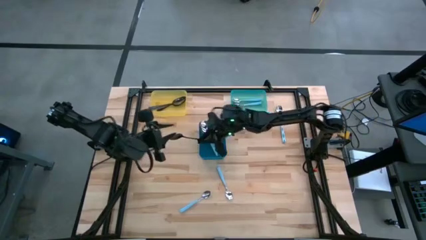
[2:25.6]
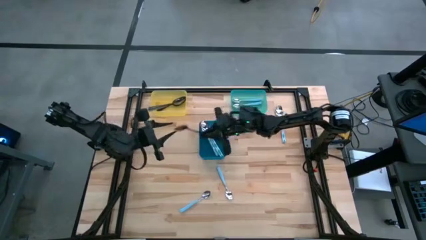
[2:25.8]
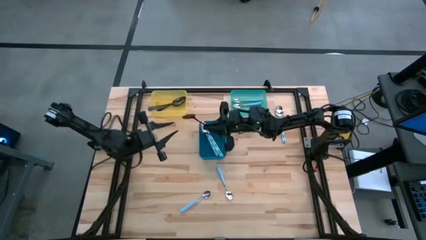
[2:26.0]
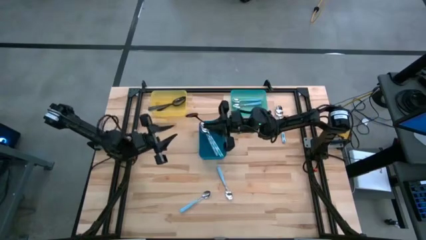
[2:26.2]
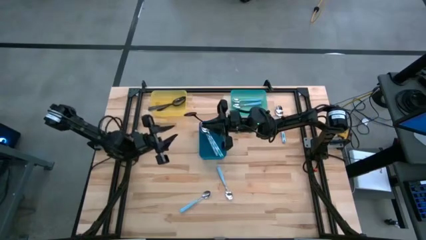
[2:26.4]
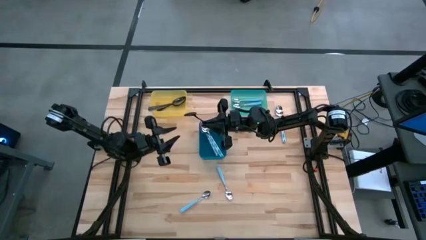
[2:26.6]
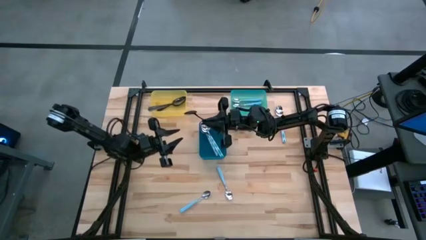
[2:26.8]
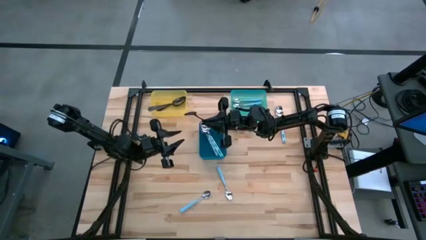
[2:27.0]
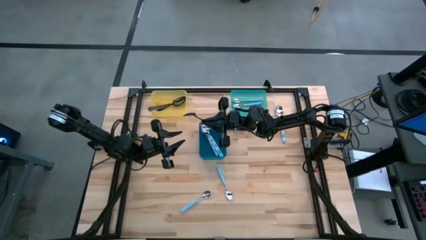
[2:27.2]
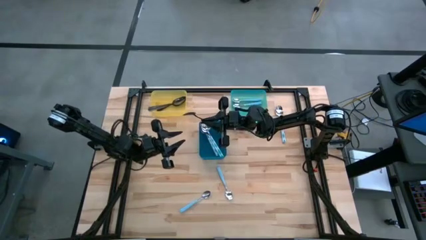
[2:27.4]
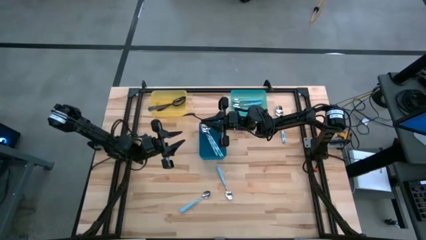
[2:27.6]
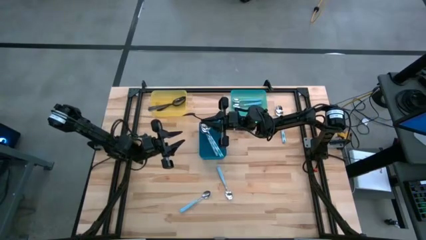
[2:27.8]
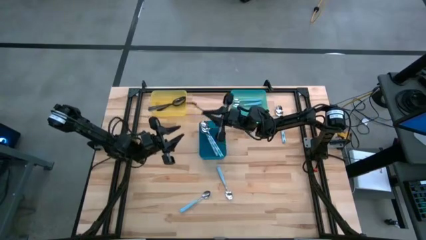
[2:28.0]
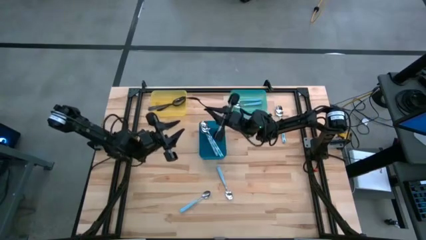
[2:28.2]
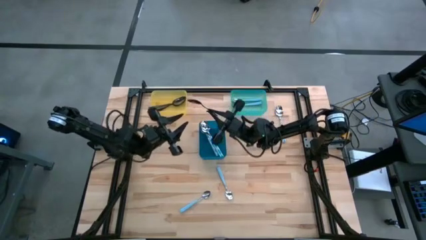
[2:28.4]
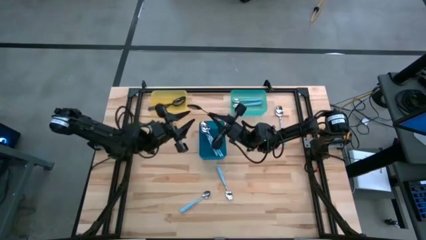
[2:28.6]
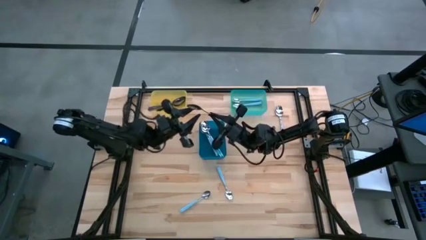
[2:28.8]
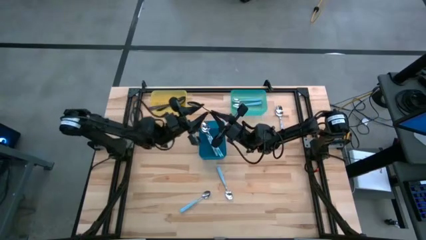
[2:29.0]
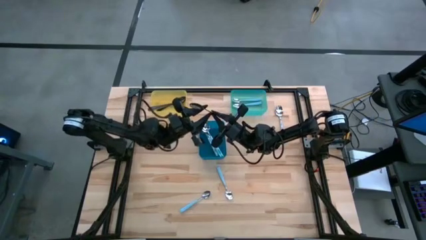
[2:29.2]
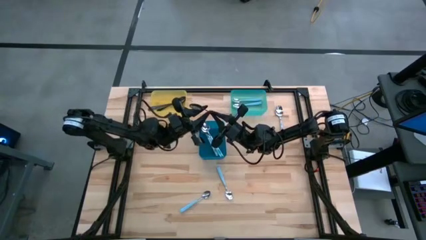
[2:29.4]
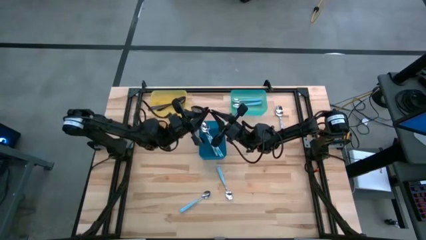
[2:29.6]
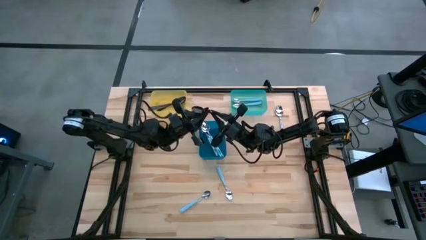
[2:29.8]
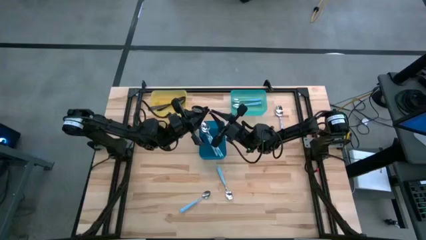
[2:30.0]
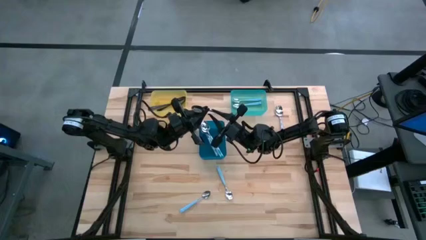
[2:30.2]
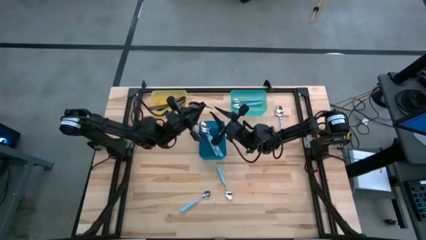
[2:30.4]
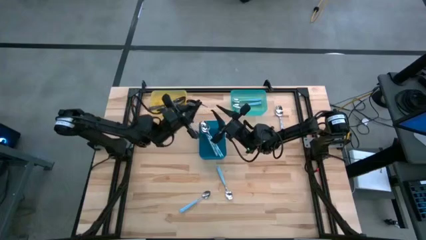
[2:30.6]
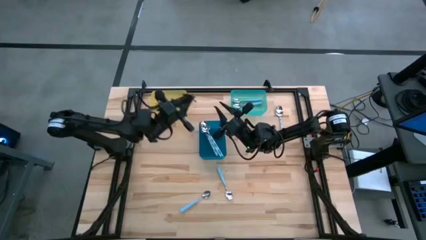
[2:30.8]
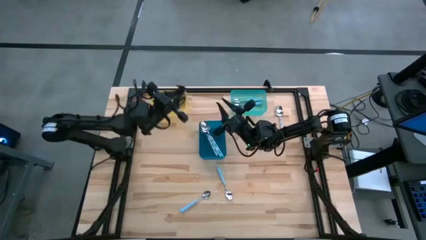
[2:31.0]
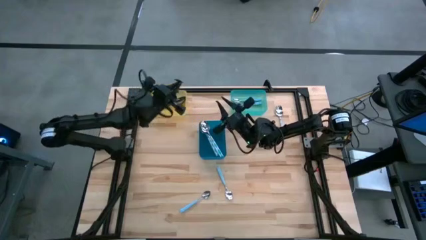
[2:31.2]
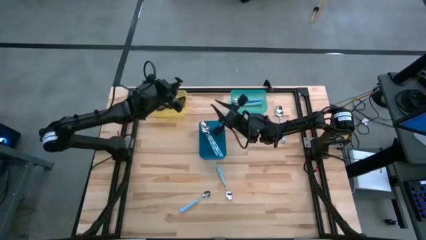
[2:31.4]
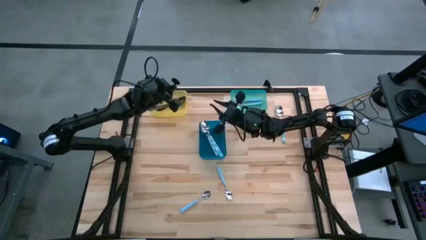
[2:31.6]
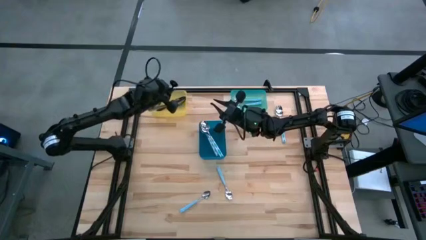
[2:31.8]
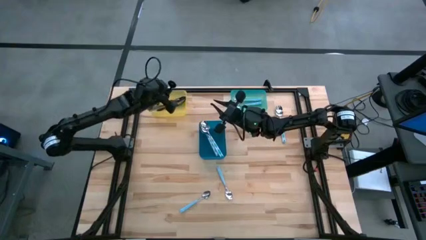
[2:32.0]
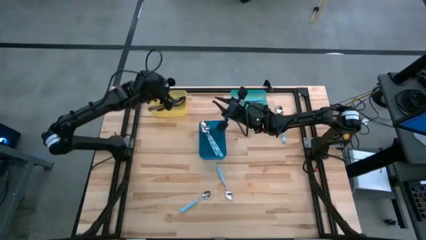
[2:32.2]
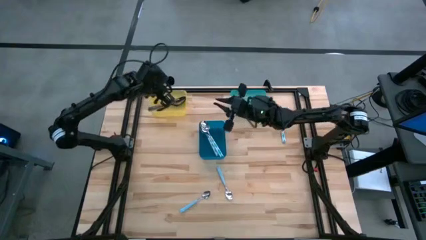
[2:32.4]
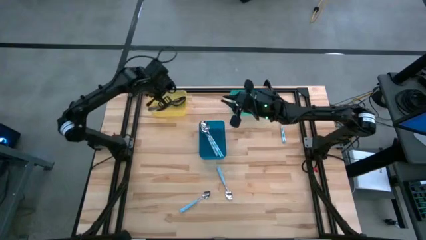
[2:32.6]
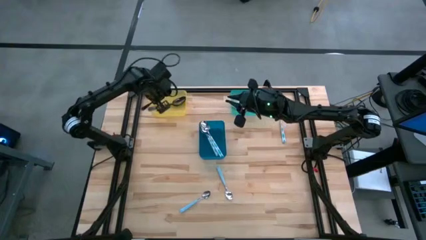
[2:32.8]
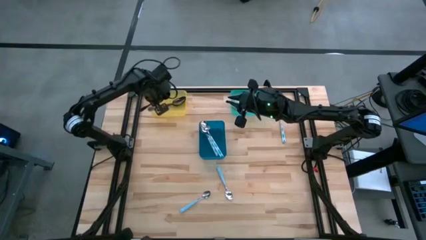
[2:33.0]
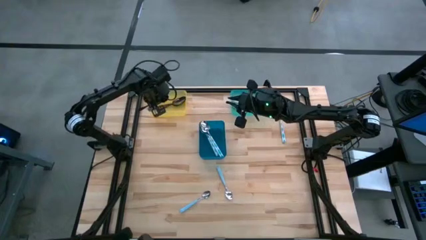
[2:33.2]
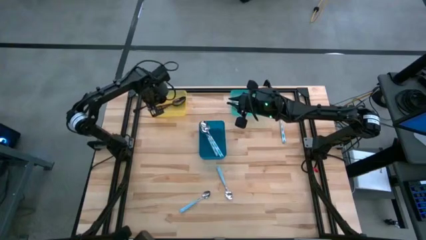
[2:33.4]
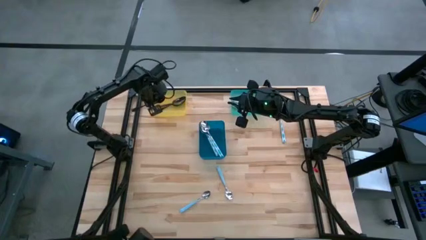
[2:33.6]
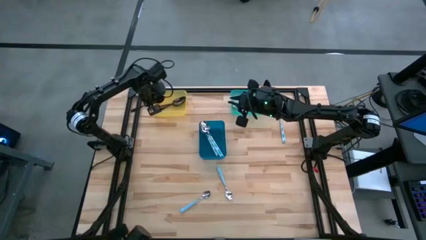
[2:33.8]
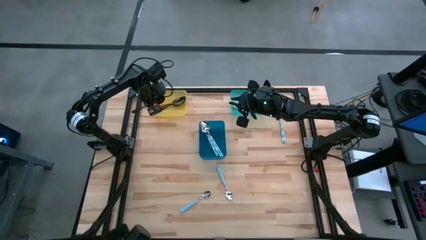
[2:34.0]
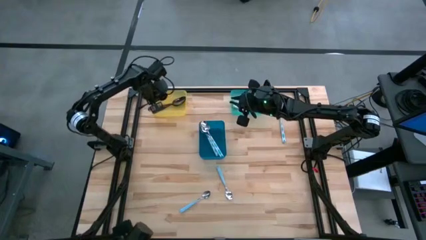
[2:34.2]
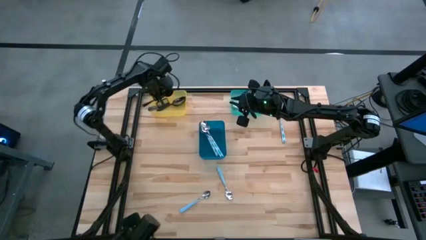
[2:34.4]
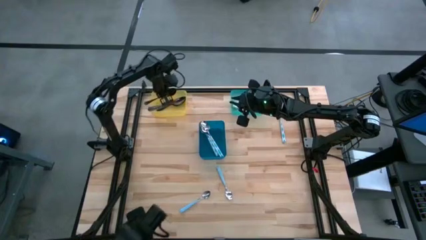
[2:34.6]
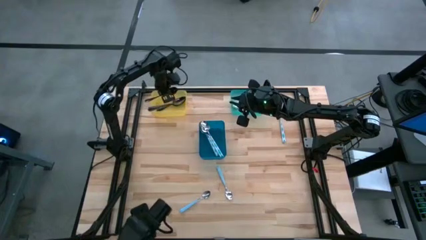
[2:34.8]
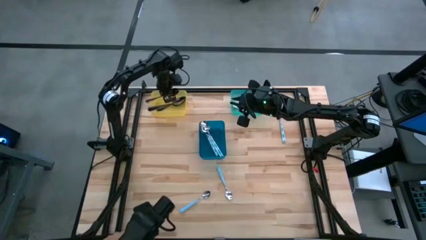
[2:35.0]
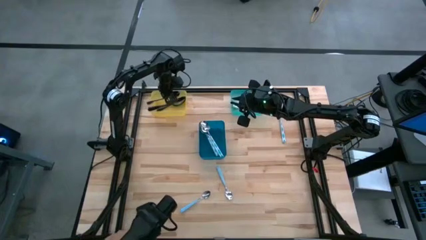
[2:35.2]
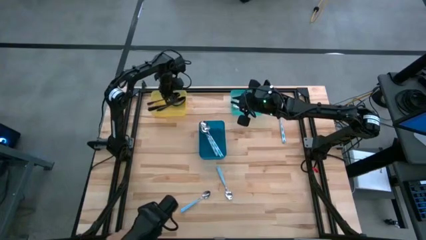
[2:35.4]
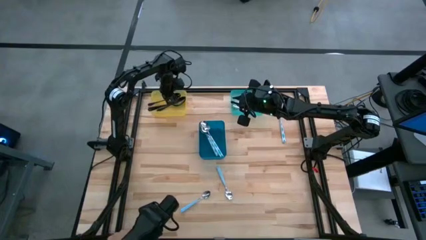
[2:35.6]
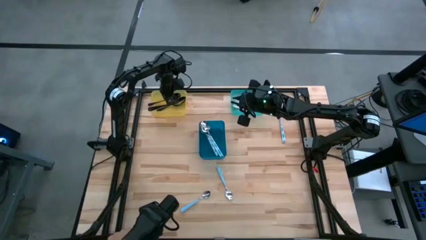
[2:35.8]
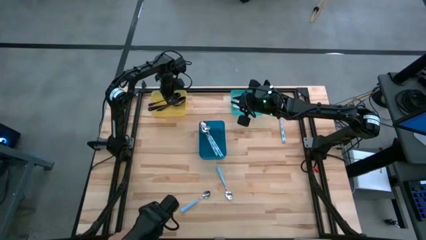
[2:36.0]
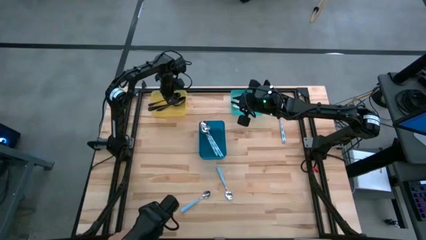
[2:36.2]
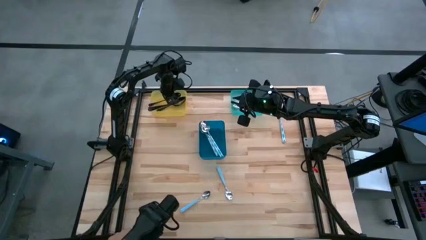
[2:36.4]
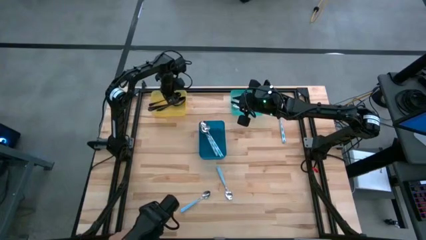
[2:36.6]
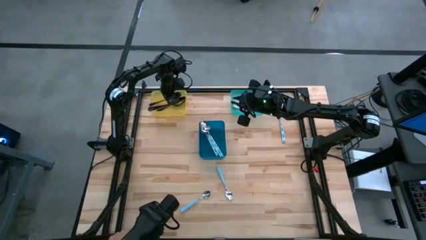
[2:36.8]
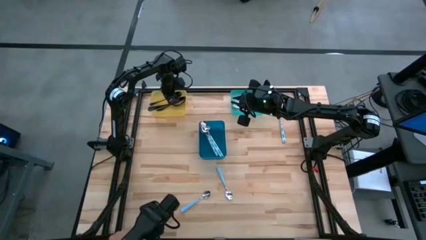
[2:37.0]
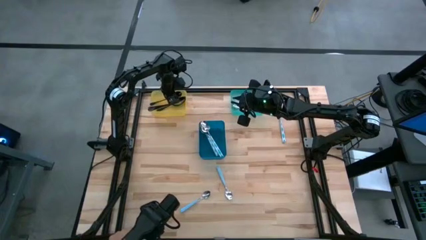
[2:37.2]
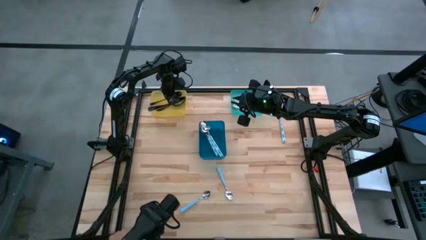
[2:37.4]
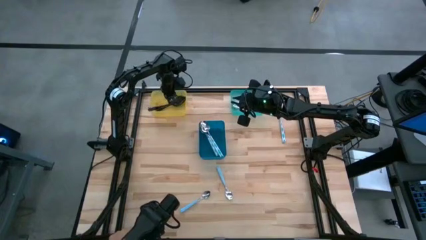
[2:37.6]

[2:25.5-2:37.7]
Task: Sort silverware by color (type)
Put the black spoon into the yellow bin

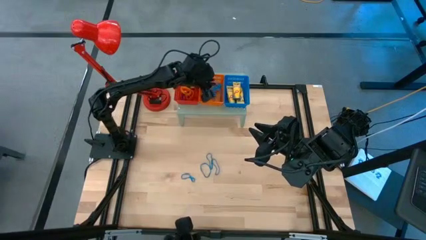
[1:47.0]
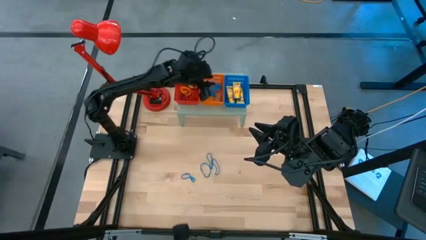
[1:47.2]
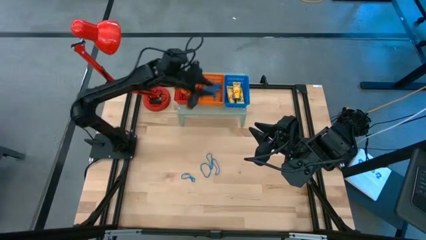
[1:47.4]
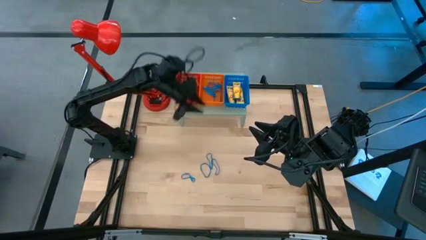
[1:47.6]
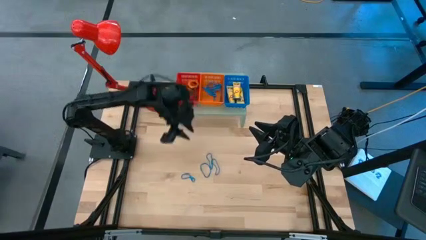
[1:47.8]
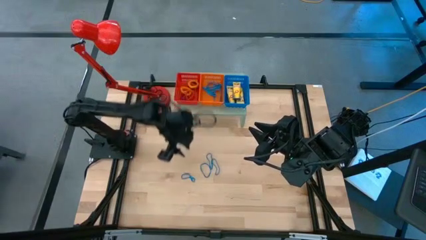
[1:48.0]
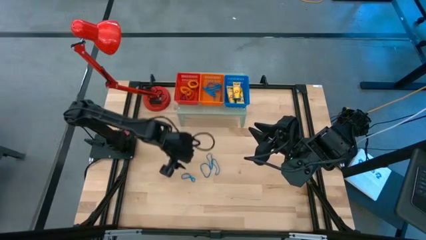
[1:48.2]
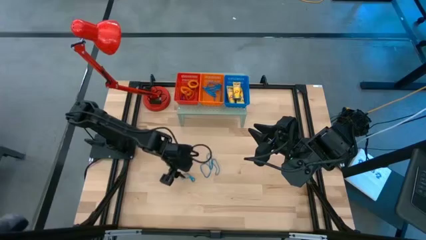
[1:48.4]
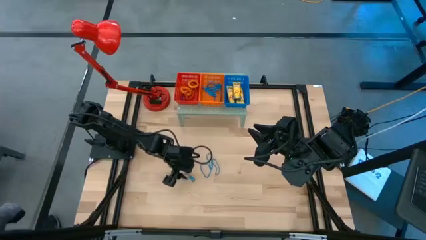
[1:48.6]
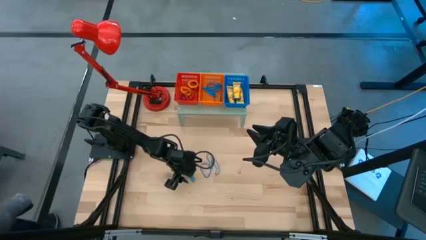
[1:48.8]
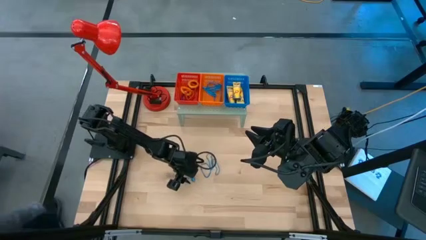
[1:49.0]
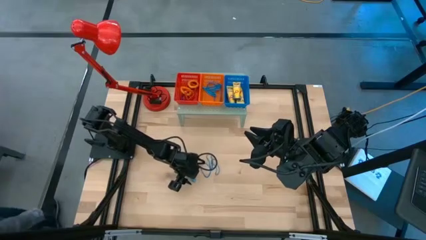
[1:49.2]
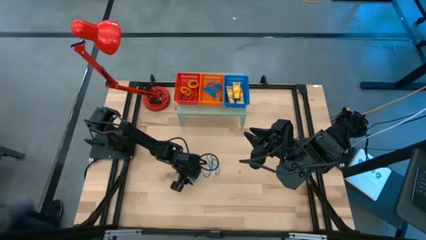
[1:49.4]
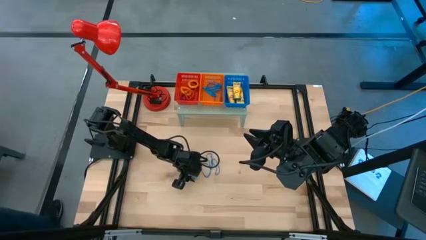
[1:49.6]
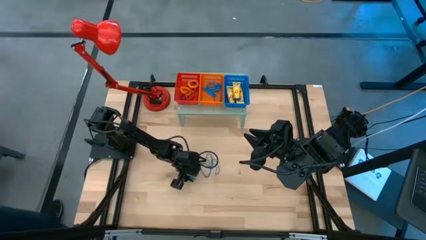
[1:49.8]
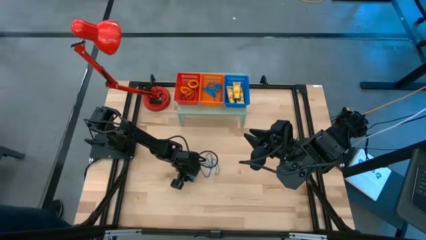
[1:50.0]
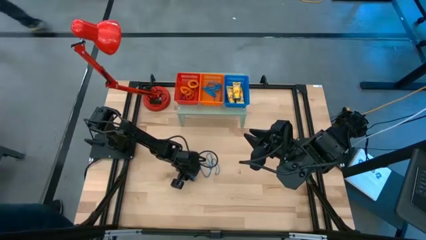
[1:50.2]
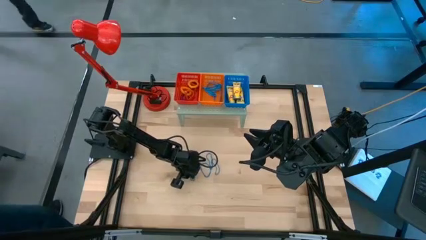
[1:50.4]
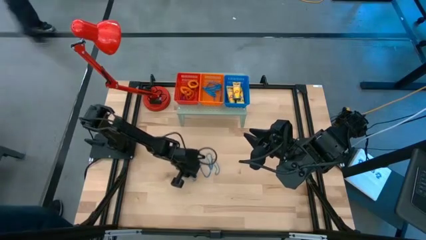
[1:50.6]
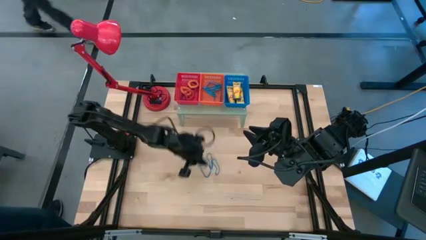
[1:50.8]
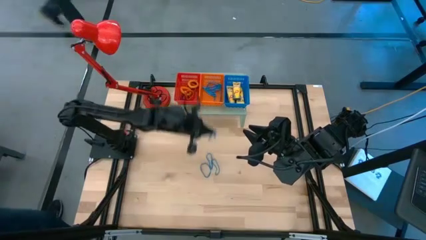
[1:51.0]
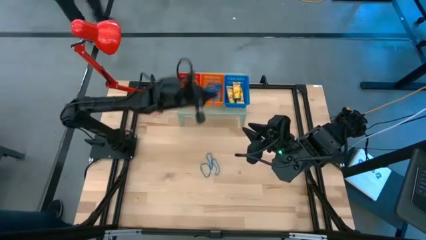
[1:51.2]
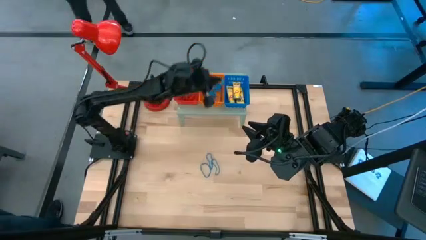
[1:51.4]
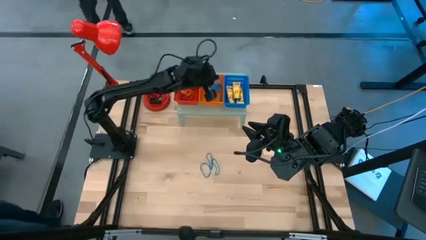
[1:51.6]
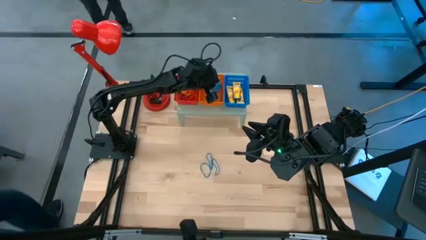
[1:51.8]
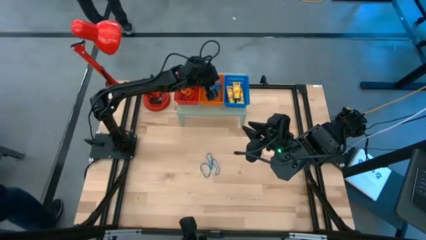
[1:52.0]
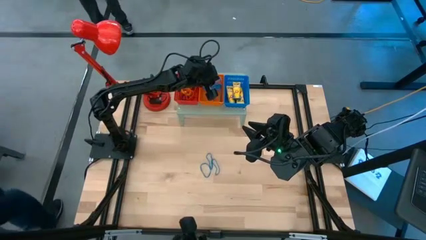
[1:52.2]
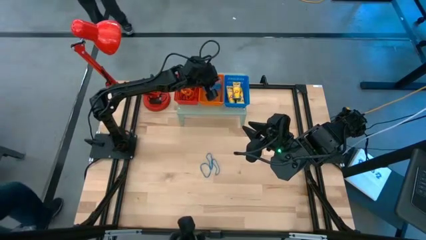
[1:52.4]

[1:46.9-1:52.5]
Task: Pick & Place Office Desk Supplies
Put the blue rubber band into the orange bin on the shelf
